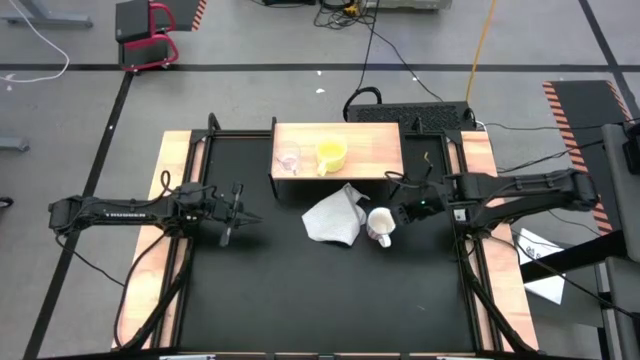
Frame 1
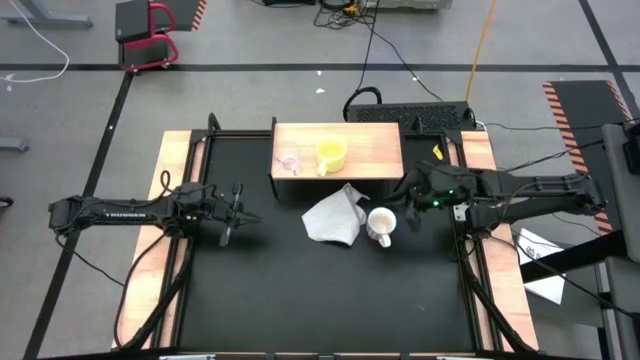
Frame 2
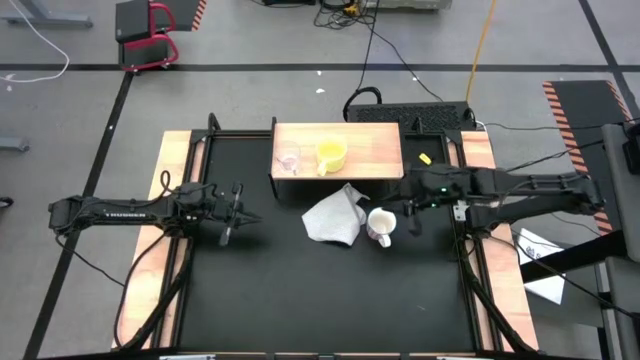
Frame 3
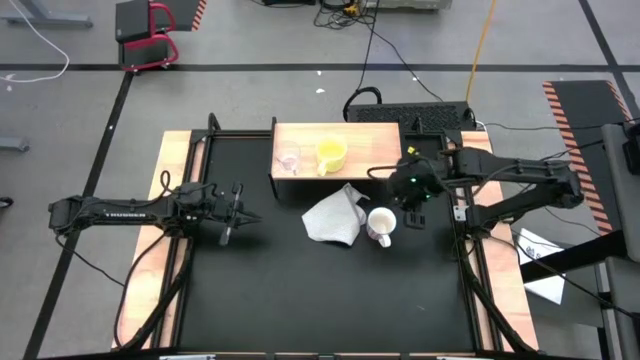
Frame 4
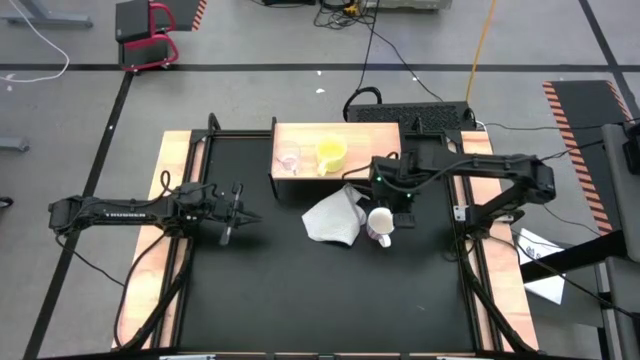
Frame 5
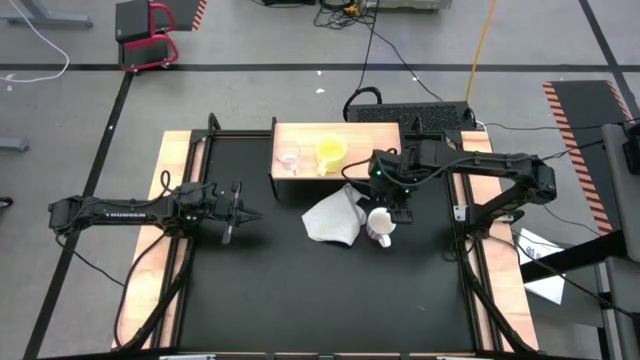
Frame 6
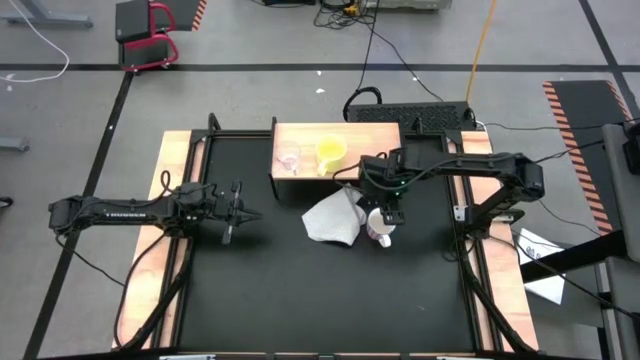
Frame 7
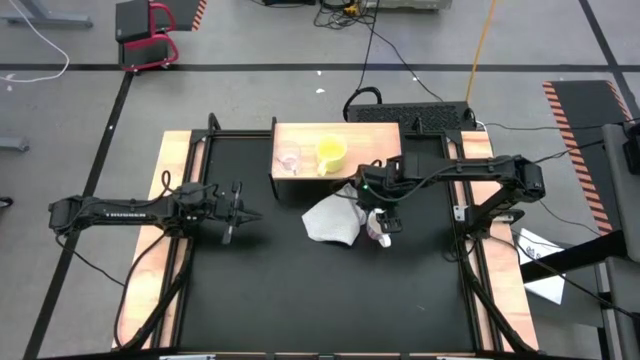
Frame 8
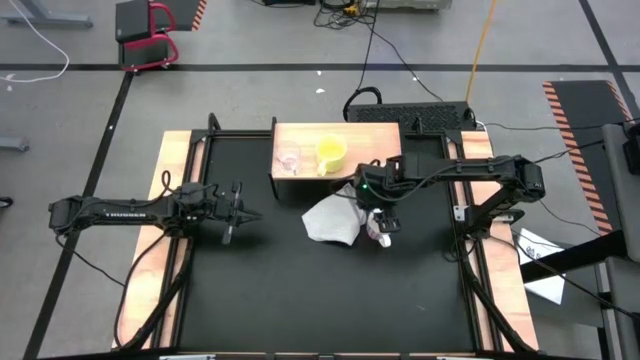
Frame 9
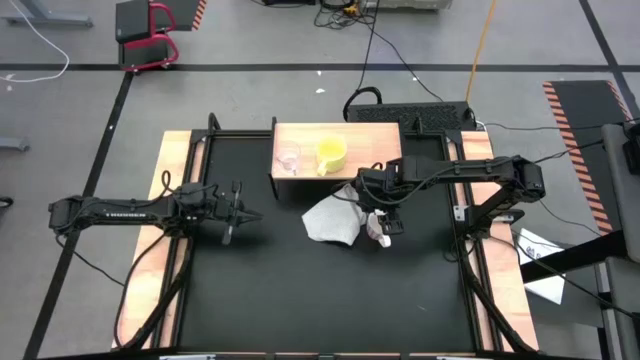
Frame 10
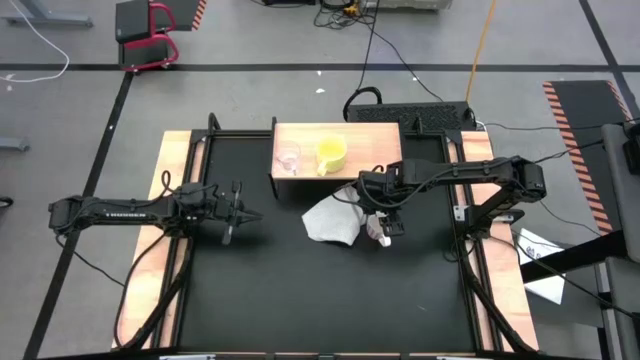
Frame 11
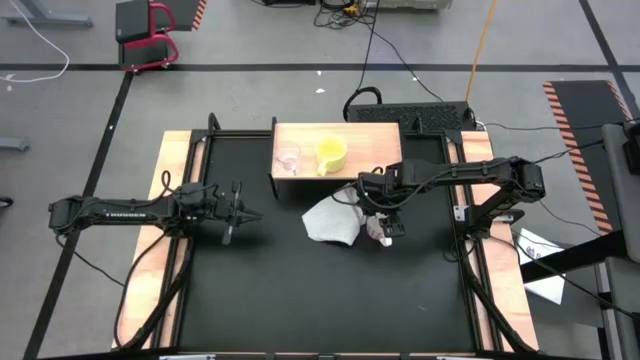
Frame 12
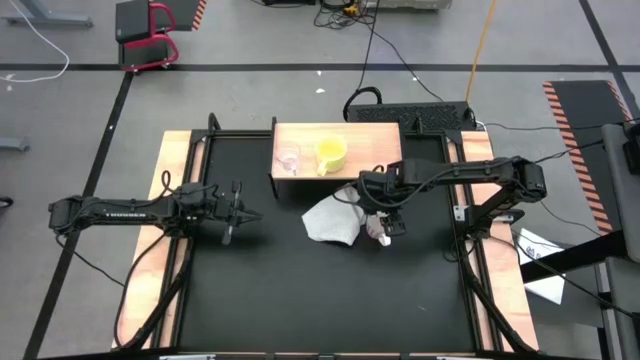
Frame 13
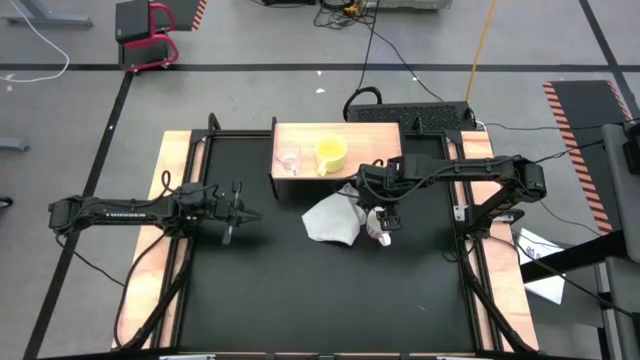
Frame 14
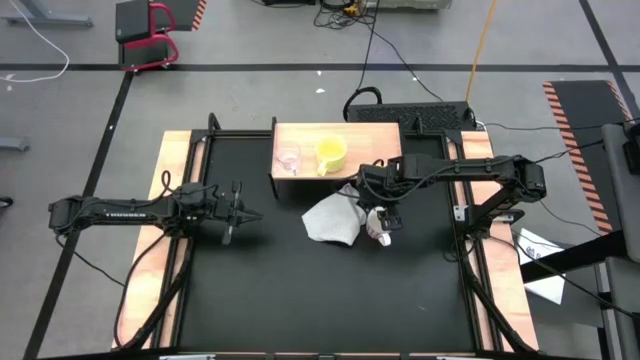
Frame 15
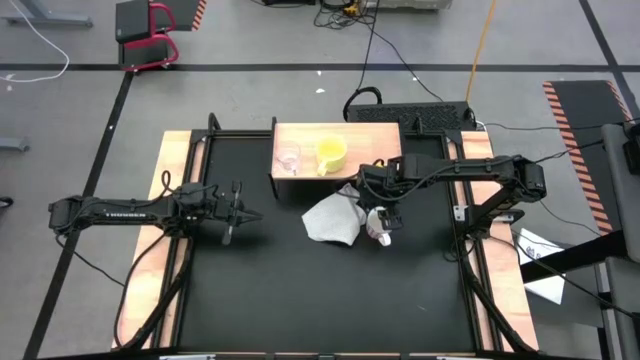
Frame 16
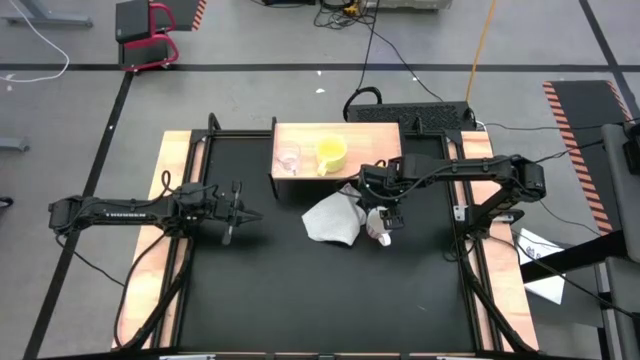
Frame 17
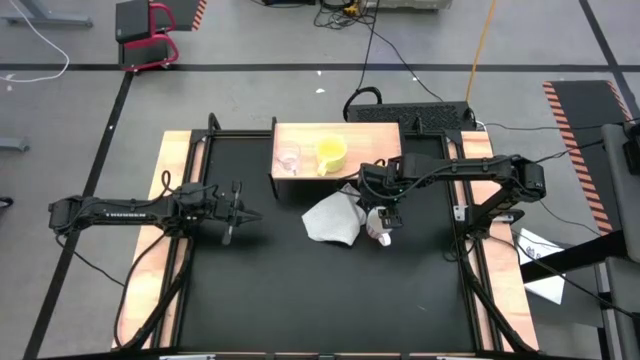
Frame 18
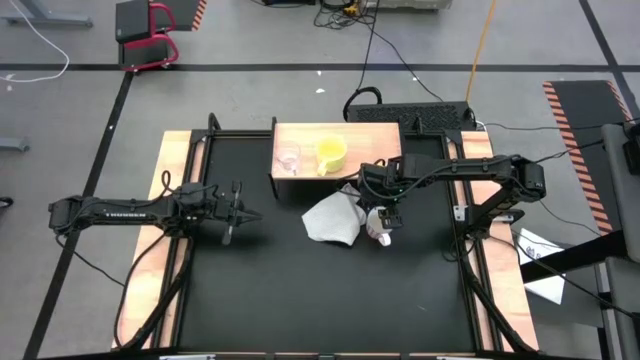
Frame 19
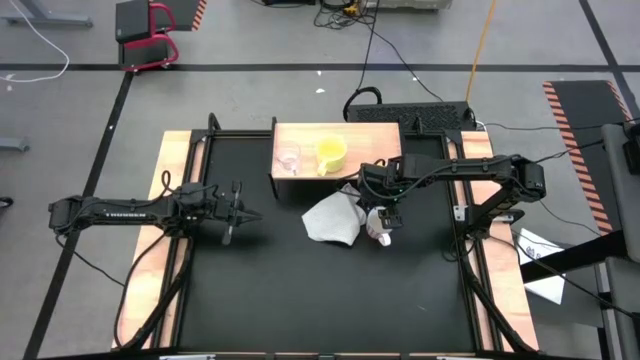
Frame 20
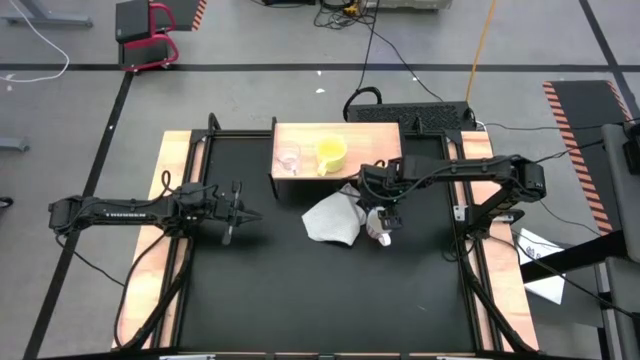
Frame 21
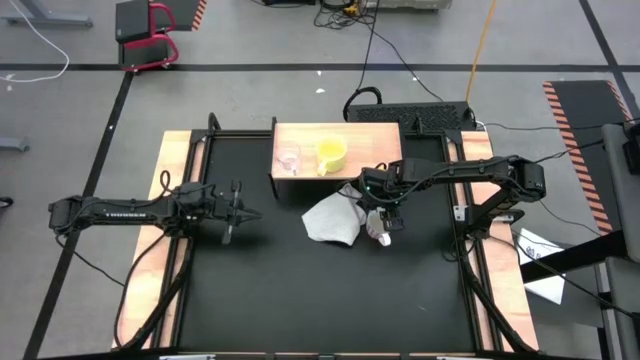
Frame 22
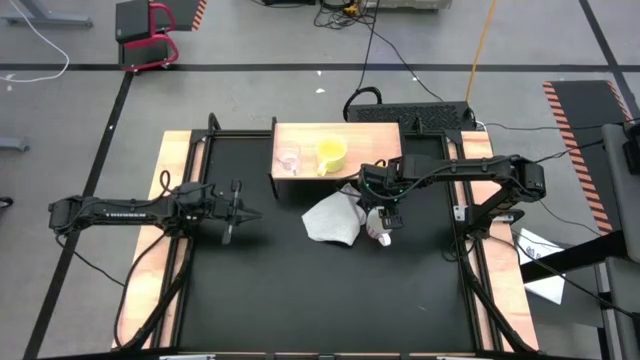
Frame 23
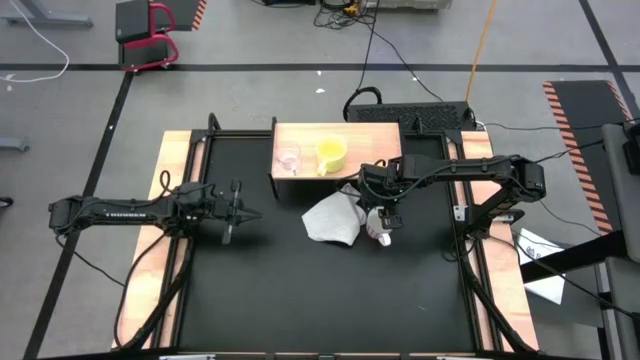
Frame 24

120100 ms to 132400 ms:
Task: Stack small to large cups/mugs on shelf
Put the red pattern white mug on the shelf

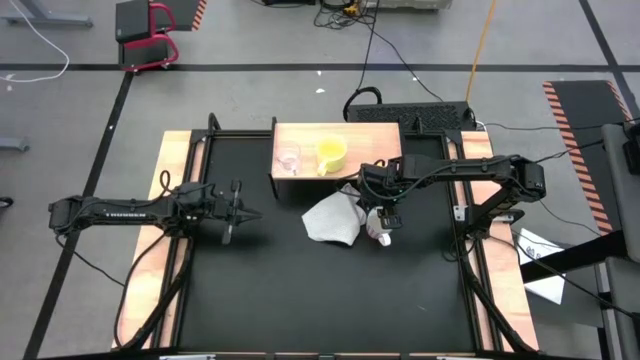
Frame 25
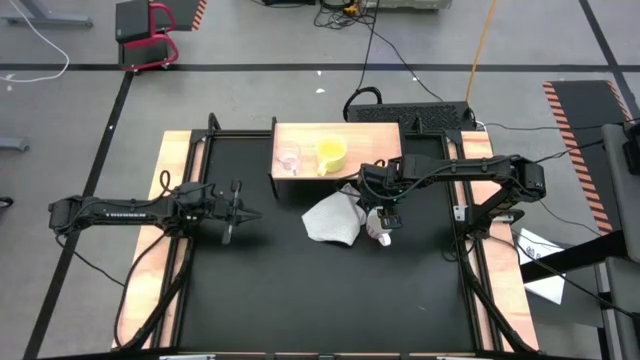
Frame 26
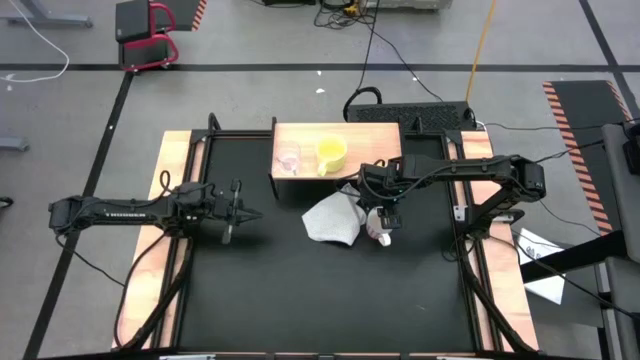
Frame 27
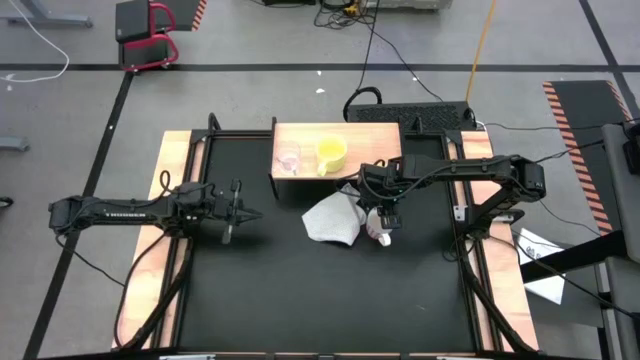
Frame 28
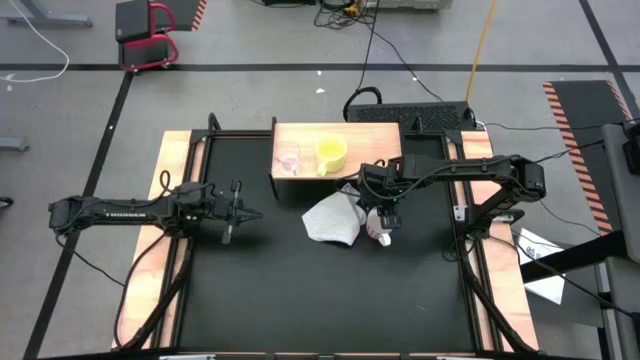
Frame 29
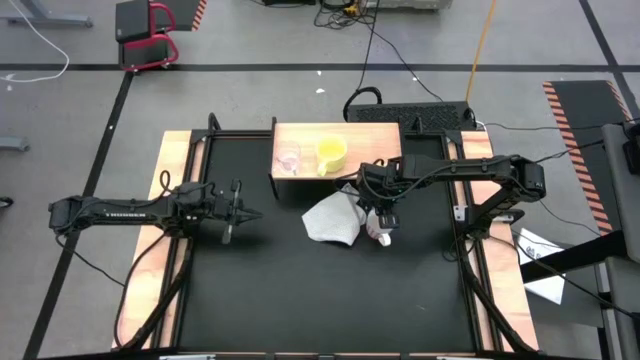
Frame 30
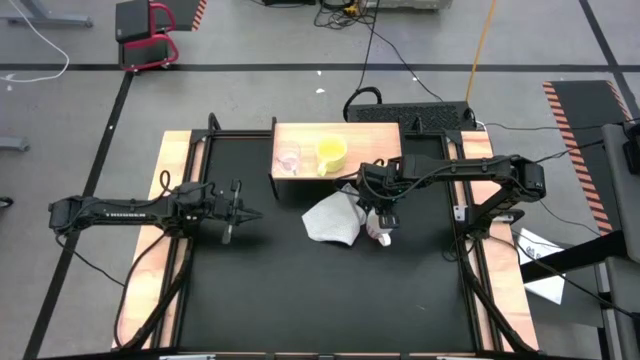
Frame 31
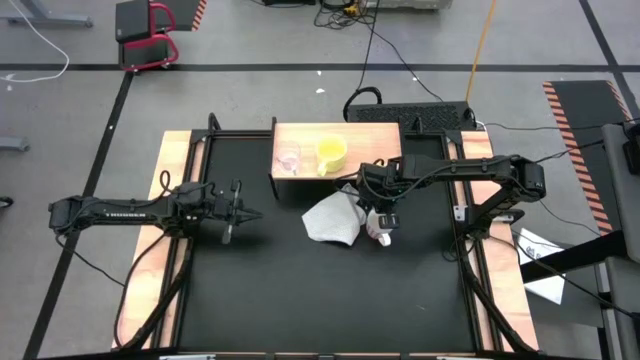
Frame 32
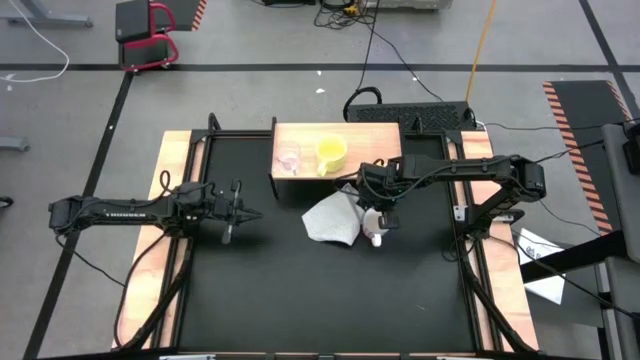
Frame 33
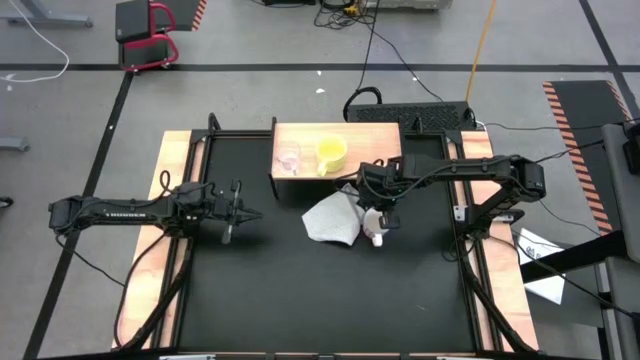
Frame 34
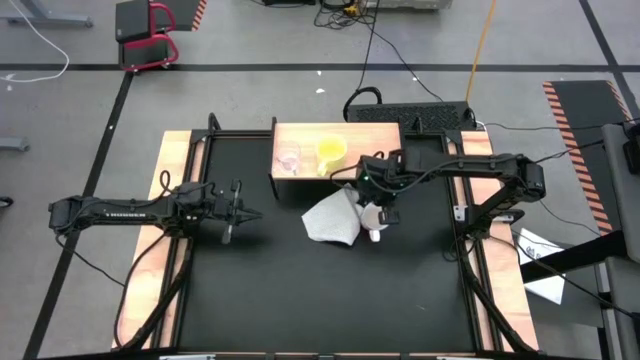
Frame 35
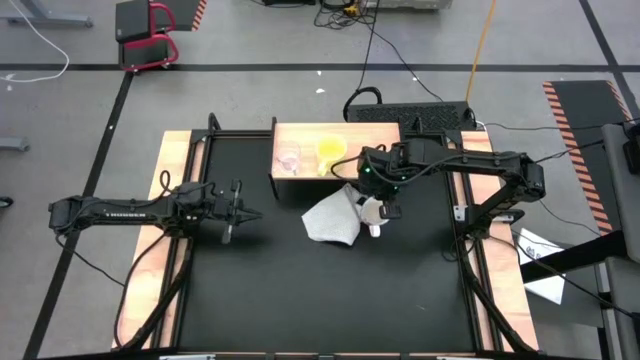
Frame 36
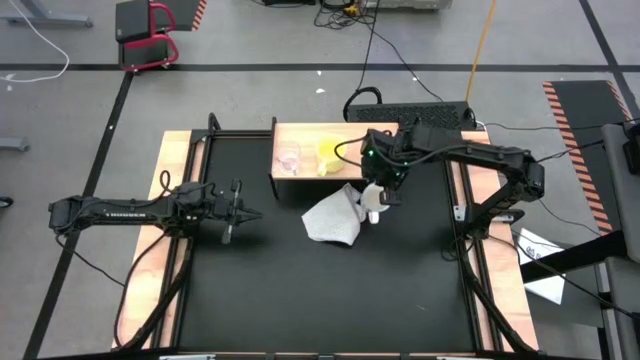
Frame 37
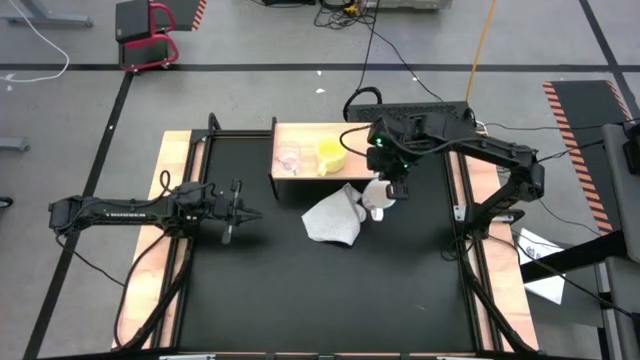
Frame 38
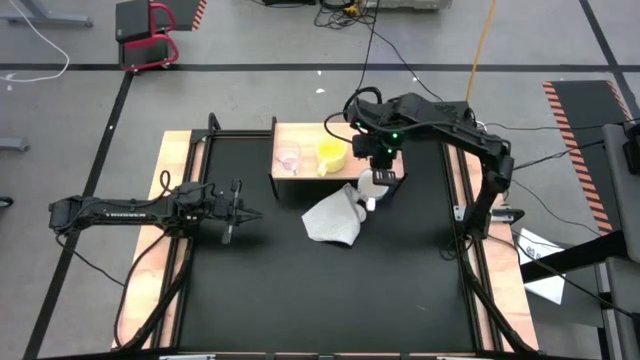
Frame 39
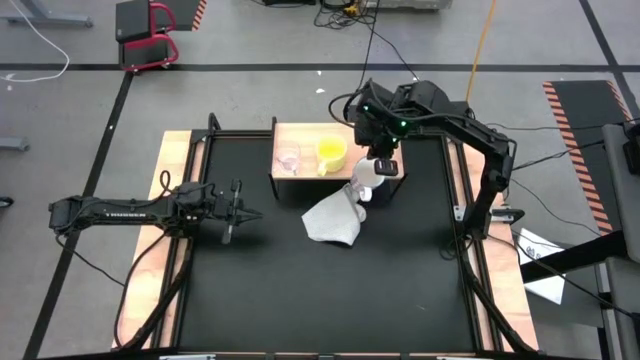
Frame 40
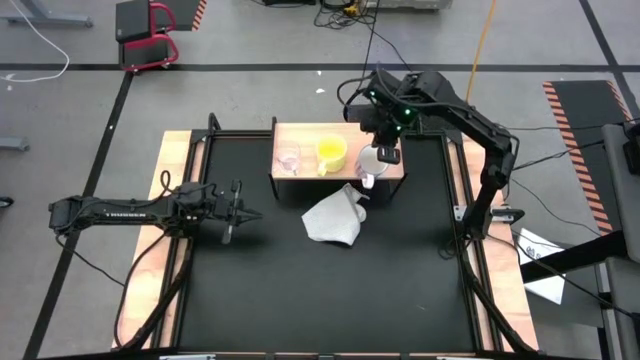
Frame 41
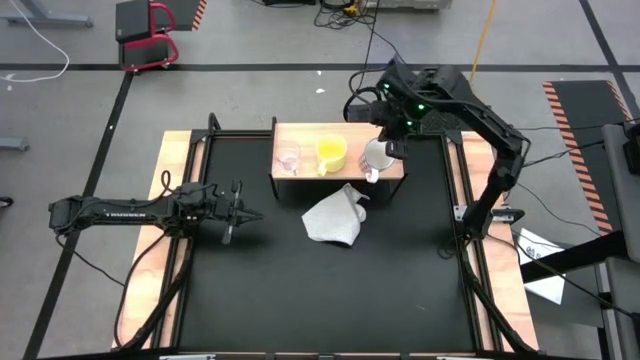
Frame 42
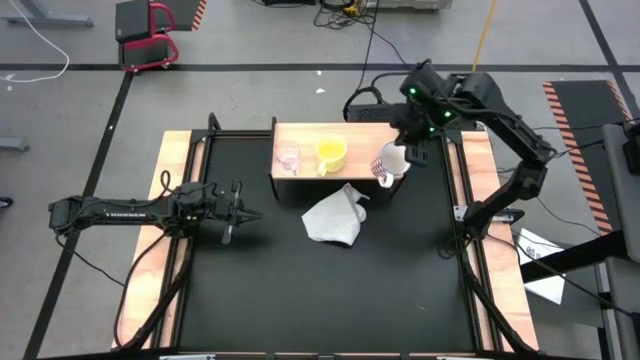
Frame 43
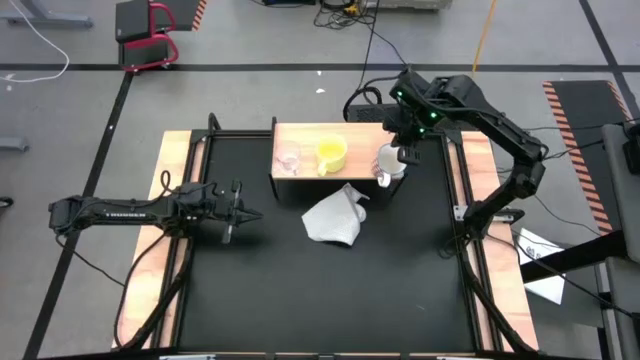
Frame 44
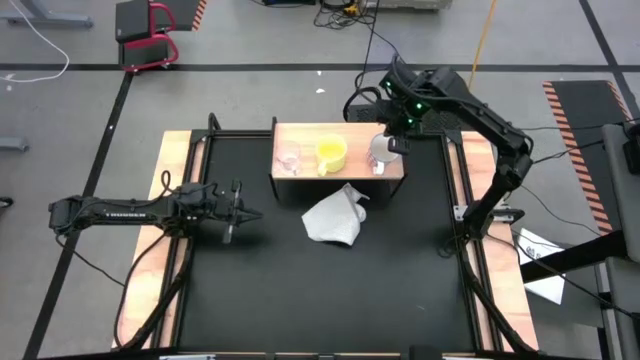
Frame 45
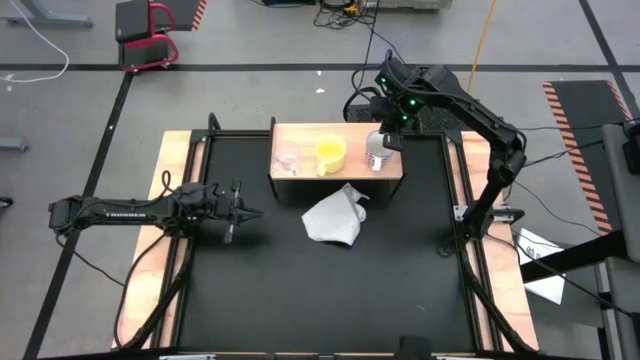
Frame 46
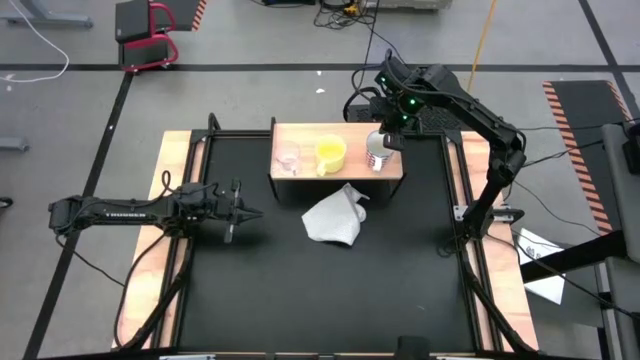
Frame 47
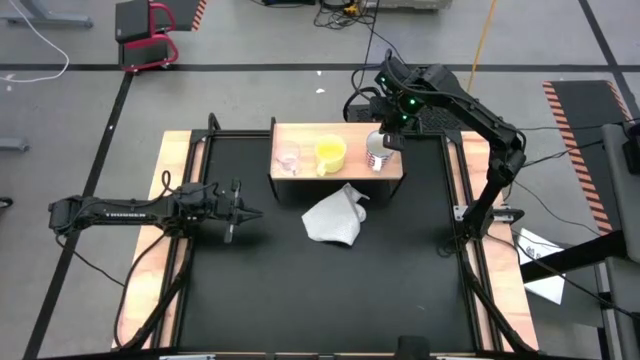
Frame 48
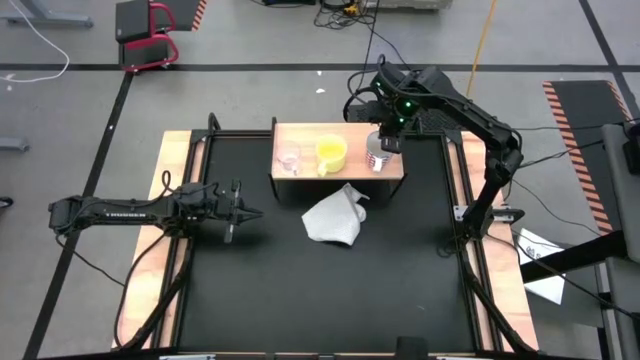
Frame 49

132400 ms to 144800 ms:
Put the red pattern white mug on the shelf
